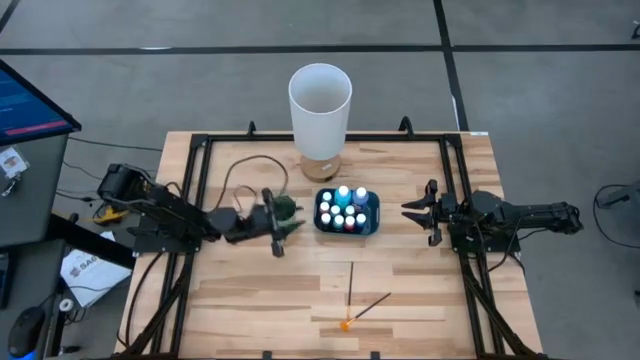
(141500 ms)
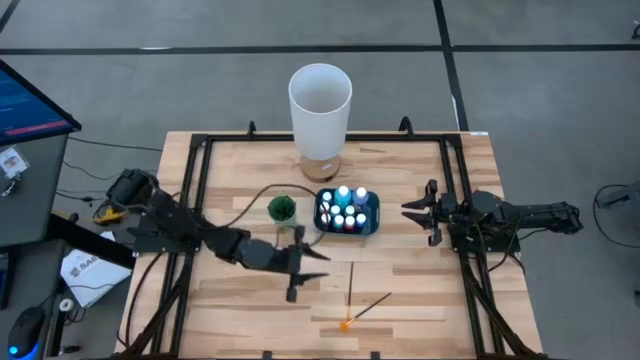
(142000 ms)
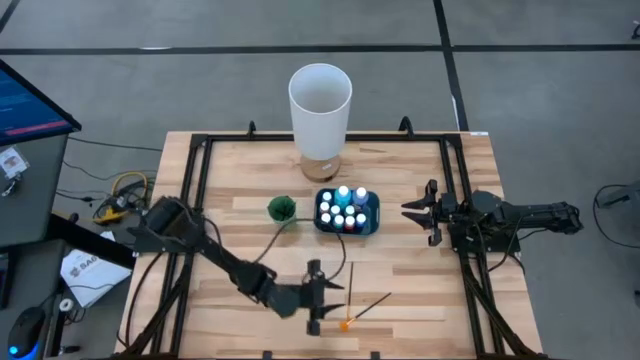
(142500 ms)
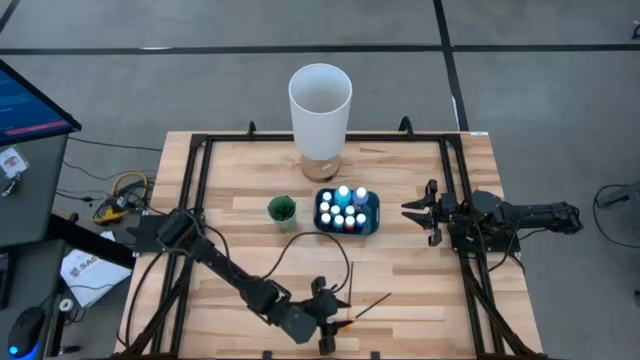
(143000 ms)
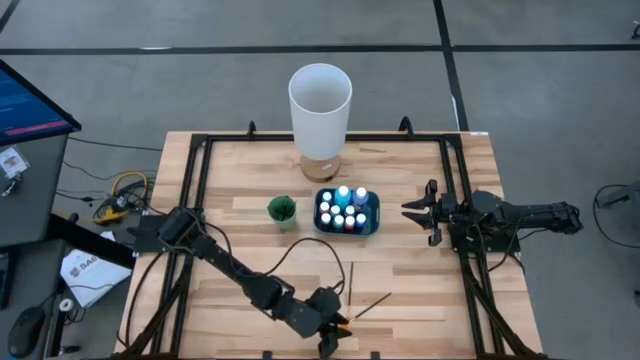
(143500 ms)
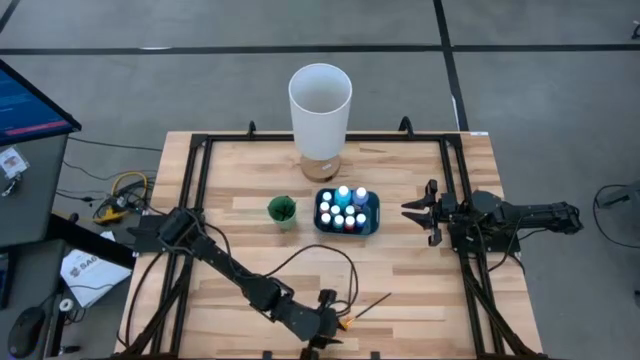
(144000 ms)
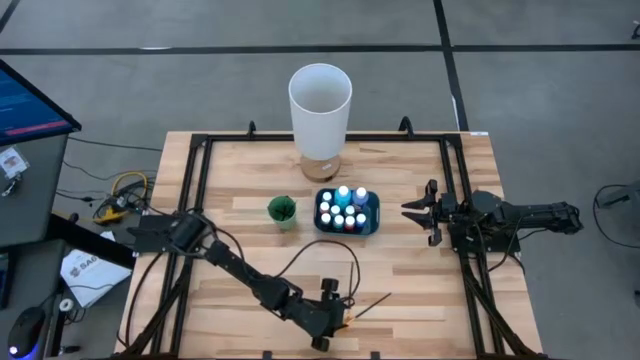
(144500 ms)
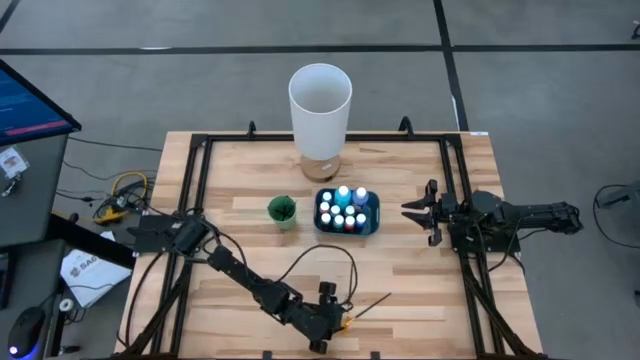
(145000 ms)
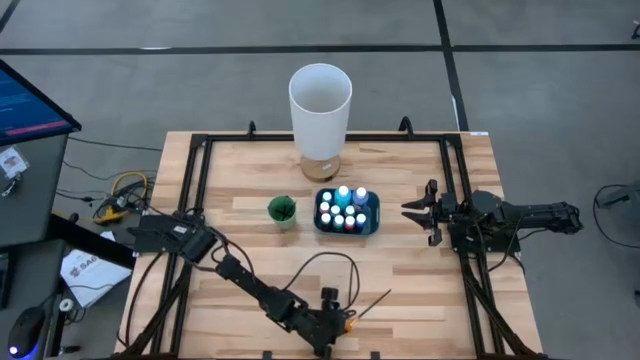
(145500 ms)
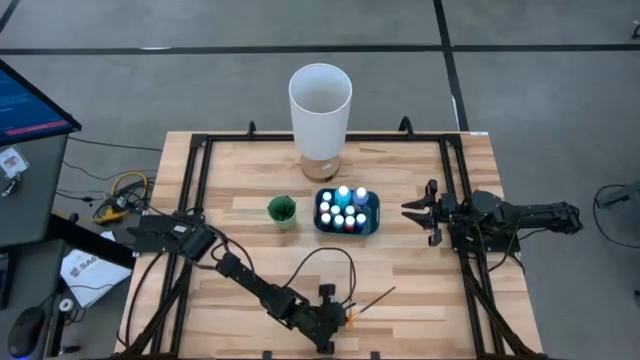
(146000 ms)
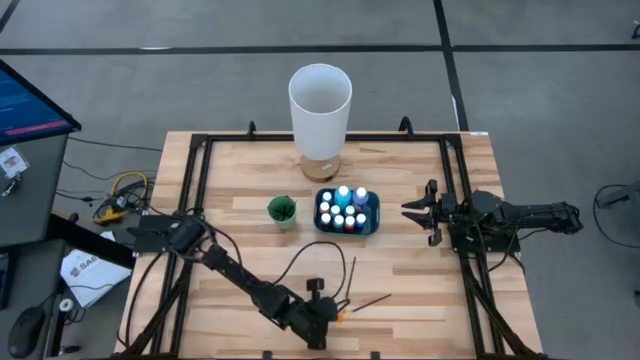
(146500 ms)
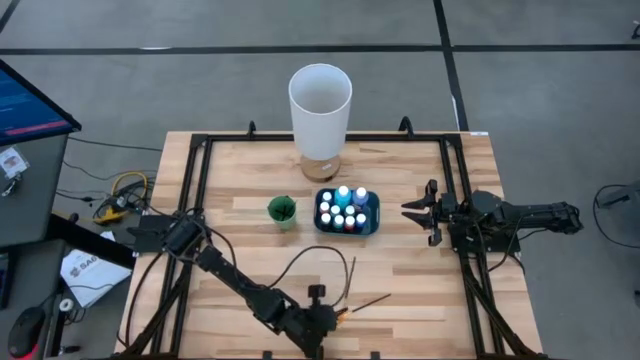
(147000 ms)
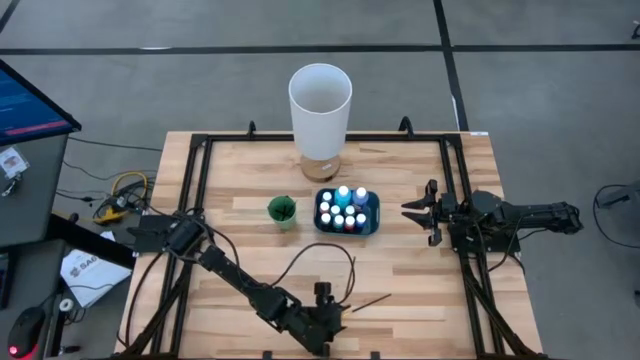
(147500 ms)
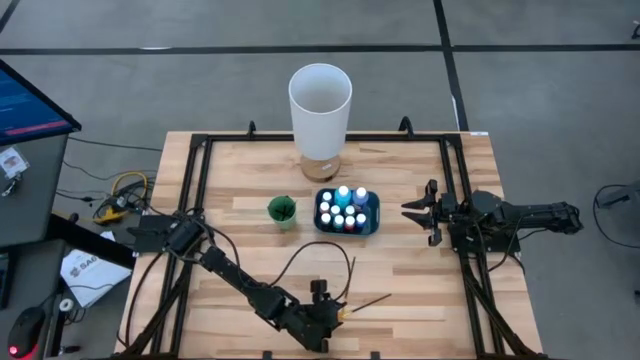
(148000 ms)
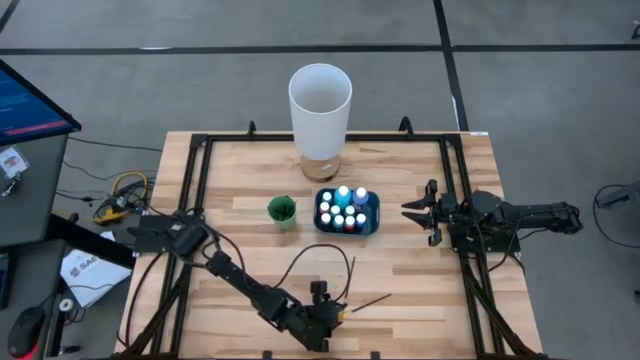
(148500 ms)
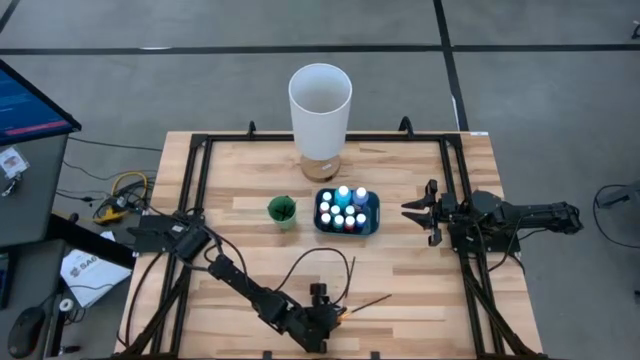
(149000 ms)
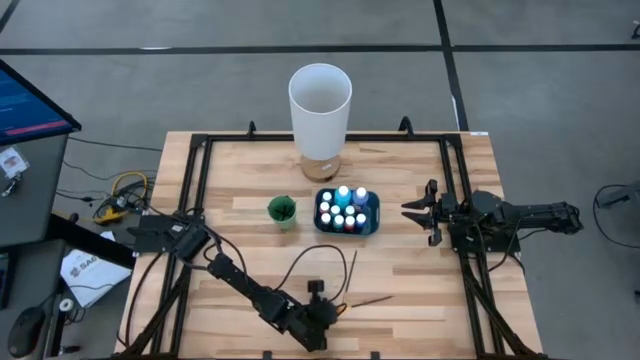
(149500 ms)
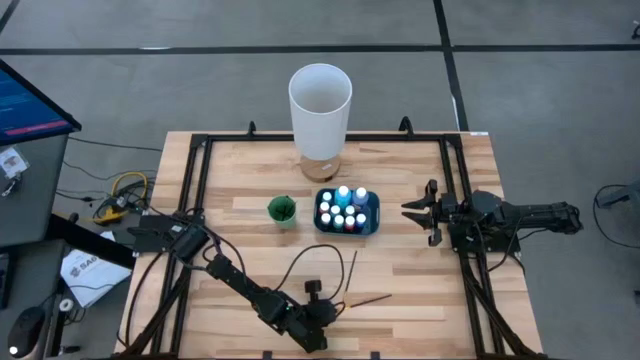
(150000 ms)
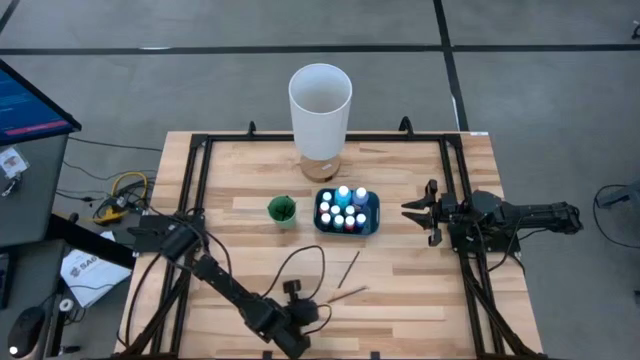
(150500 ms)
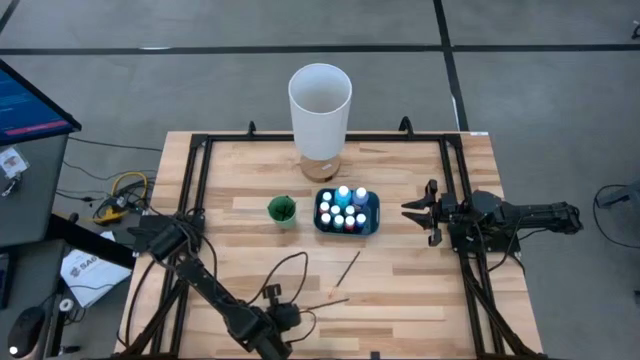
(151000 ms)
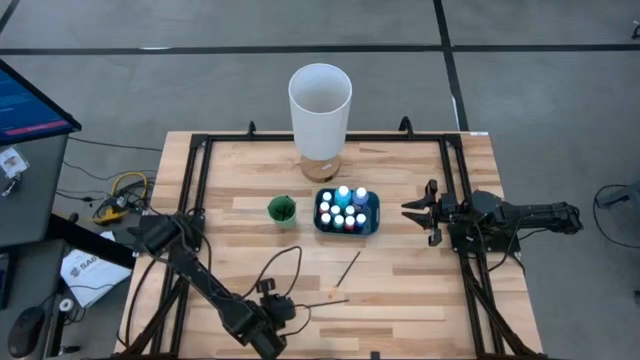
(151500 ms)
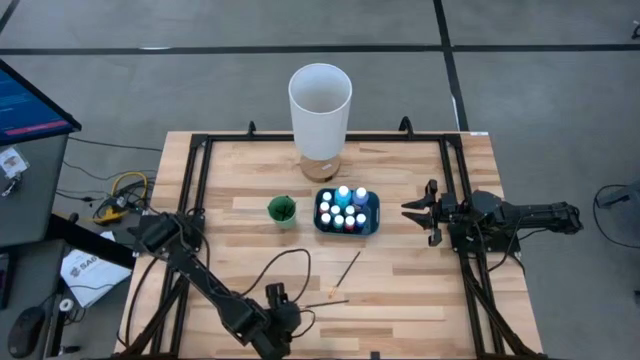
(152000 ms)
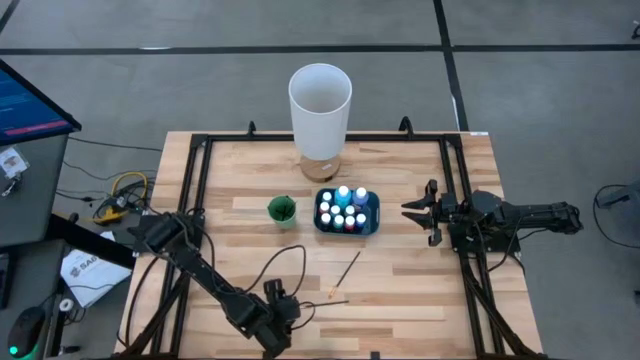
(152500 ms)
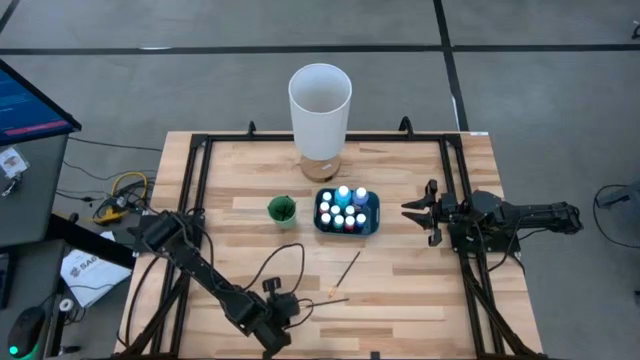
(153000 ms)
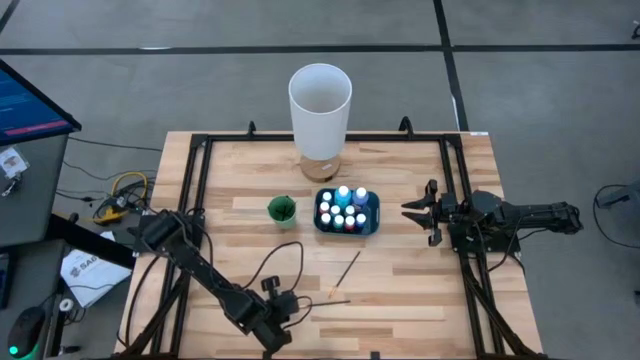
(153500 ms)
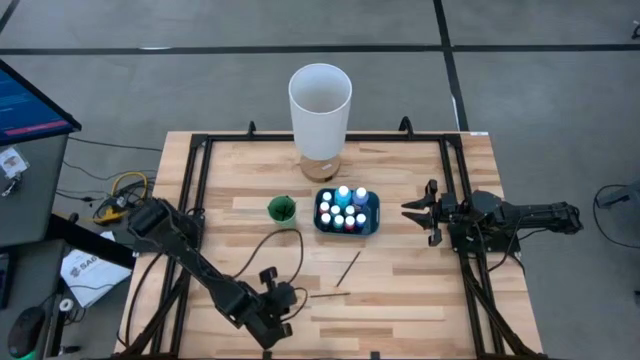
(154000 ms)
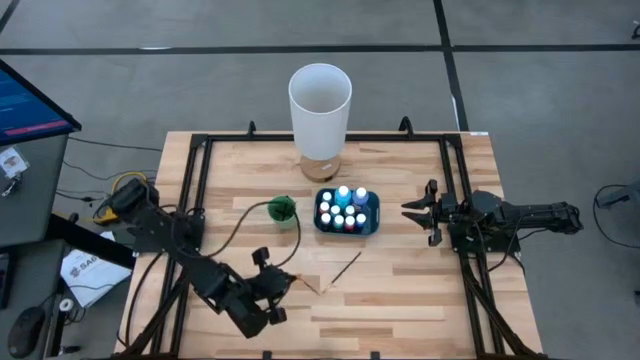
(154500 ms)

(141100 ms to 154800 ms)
Task: Pick & Place Paint Supplies
Put the right gold paintbrush into the green cup

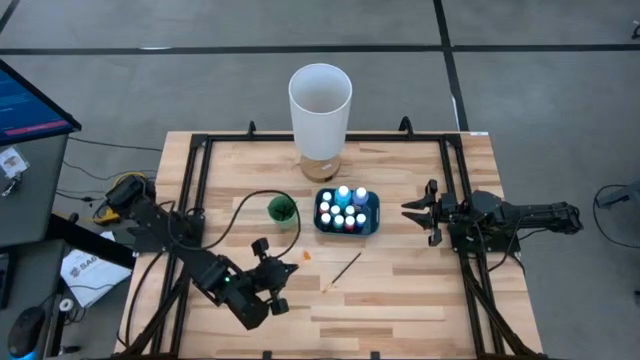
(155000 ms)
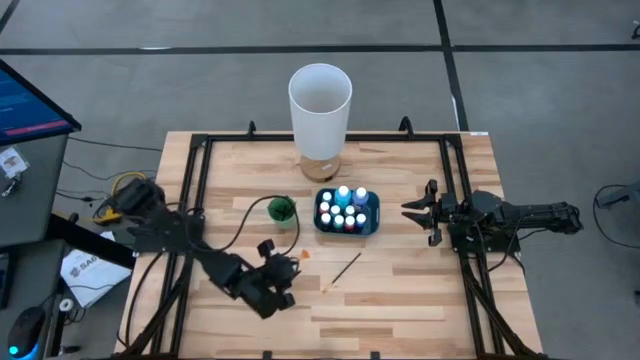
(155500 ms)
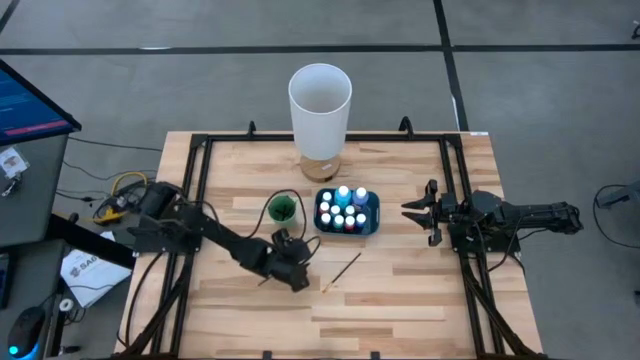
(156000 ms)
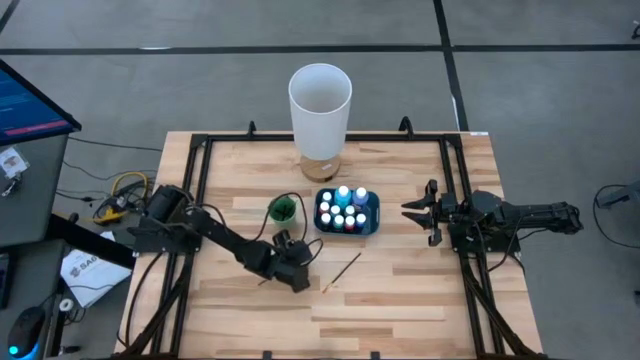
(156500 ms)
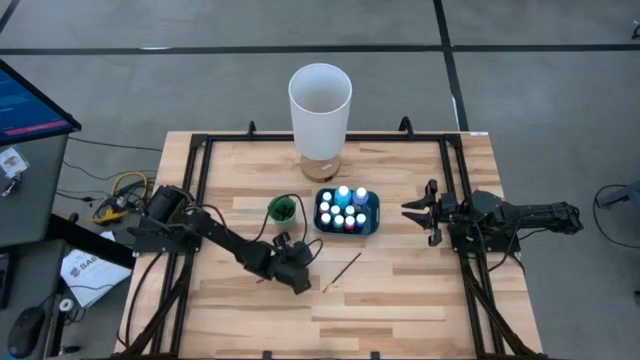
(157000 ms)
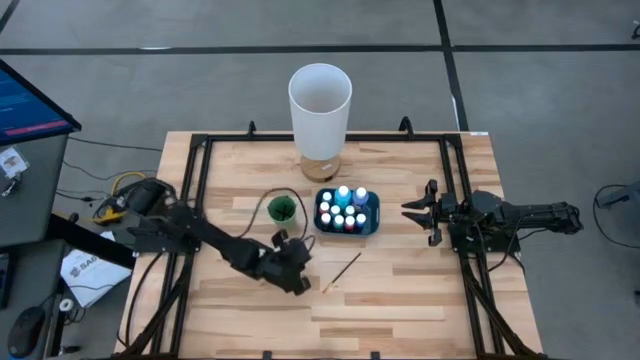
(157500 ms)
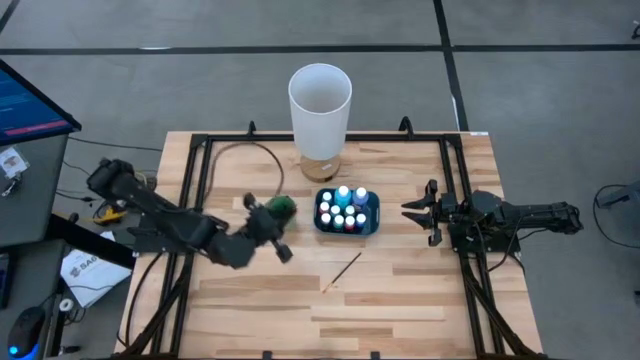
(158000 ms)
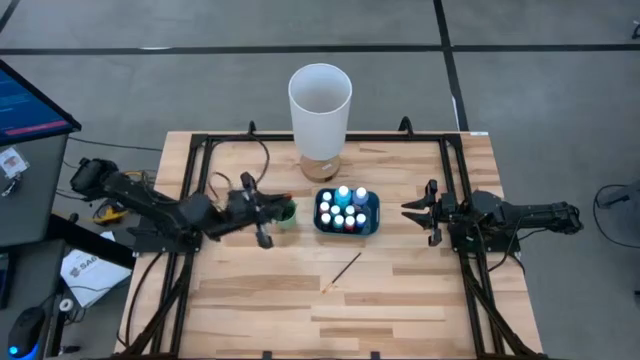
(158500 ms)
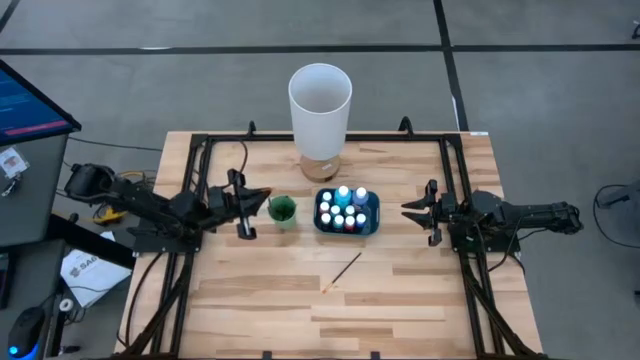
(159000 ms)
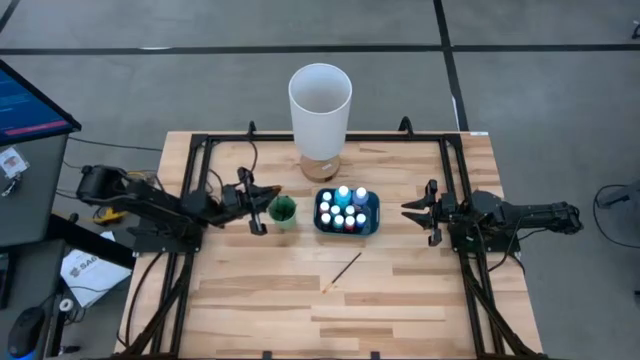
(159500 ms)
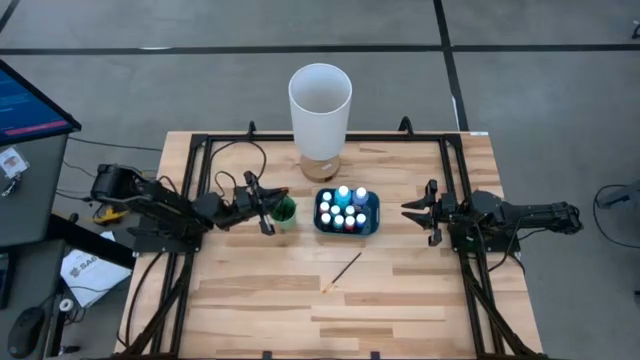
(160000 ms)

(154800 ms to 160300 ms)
Put the right gold paintbrush into the green cup

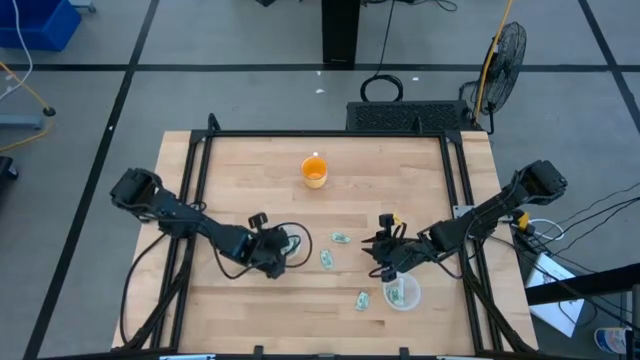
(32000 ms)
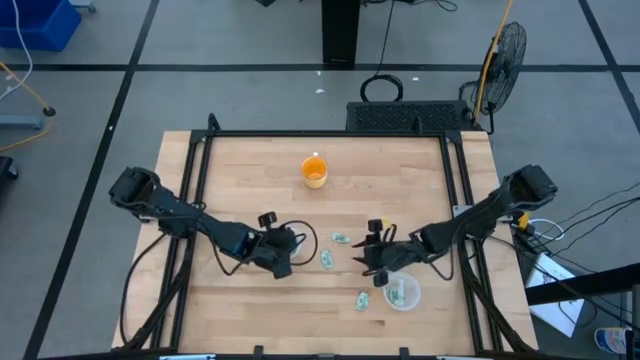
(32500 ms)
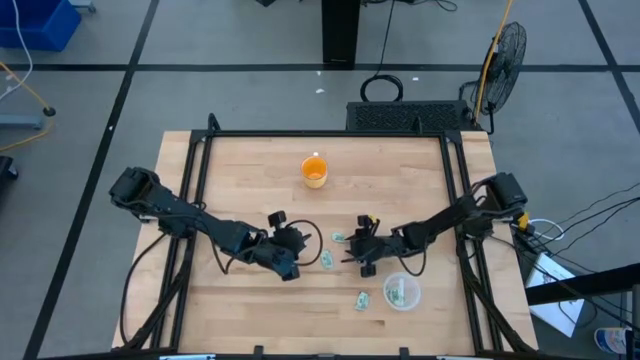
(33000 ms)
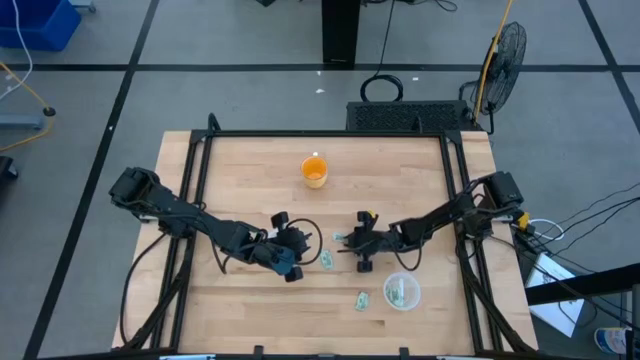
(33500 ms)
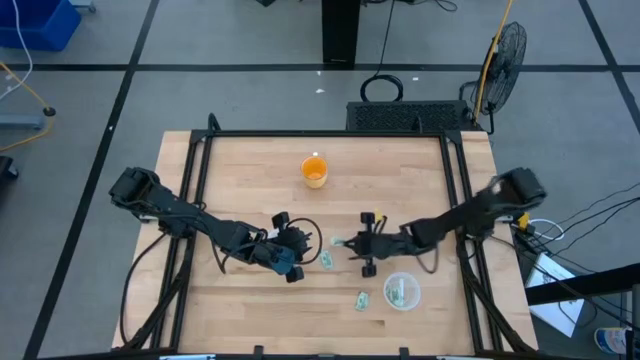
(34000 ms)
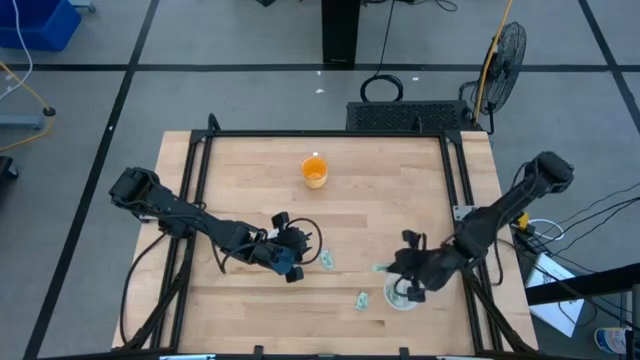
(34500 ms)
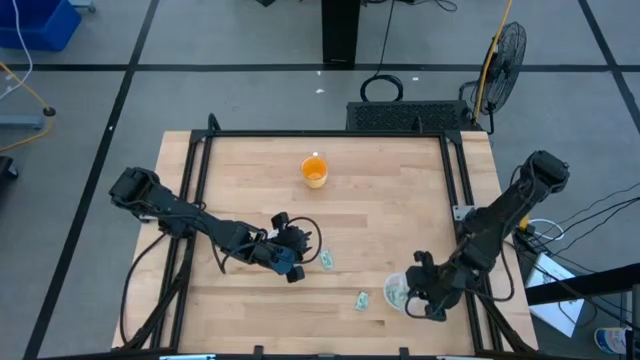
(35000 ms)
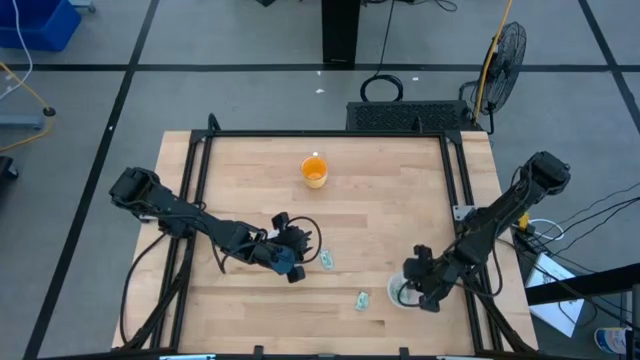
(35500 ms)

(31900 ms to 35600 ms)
Task: Pick and place Stevia / Truvia into bins
Put the white stevia packet into the bottom transparent container
